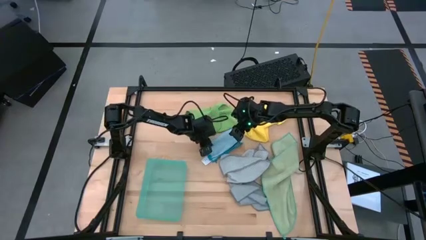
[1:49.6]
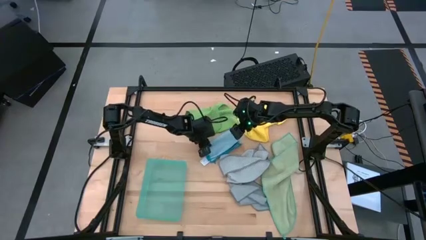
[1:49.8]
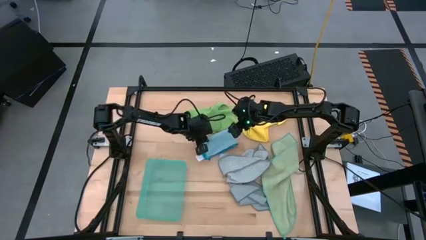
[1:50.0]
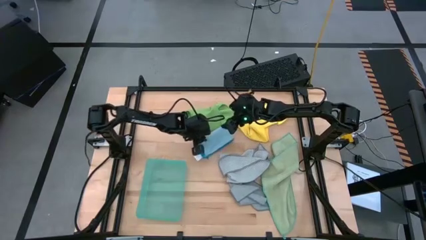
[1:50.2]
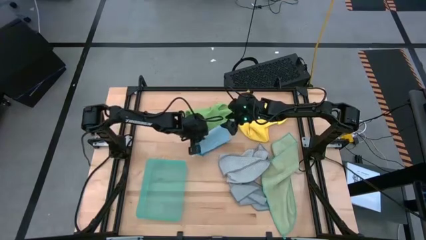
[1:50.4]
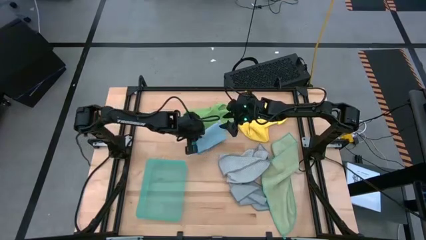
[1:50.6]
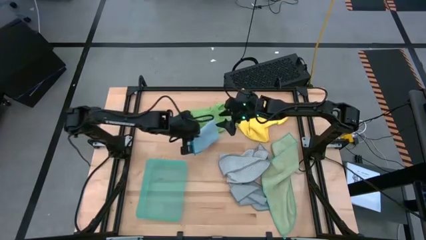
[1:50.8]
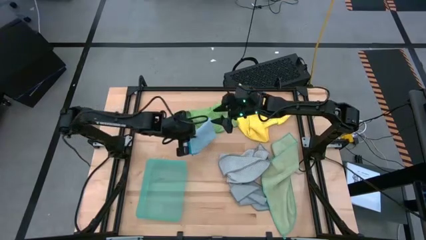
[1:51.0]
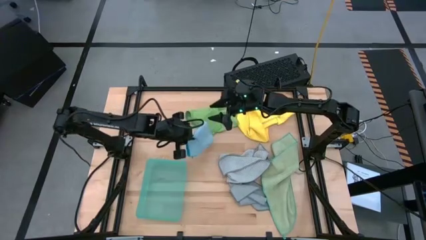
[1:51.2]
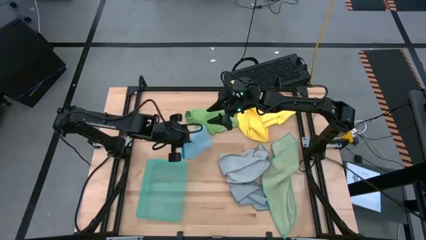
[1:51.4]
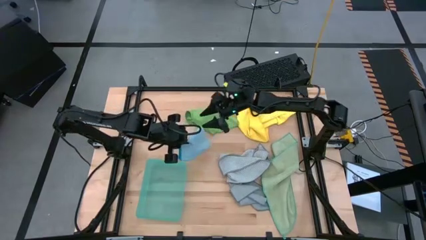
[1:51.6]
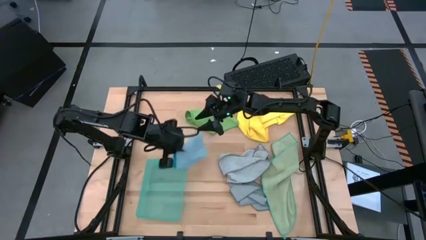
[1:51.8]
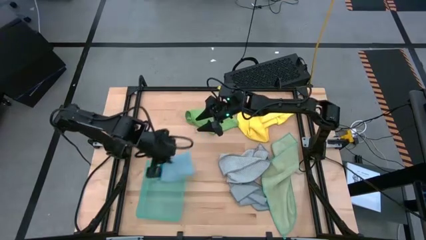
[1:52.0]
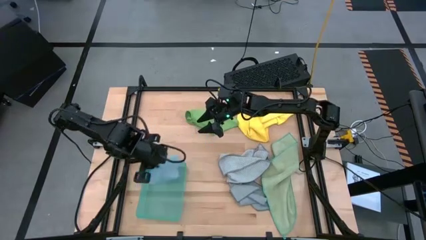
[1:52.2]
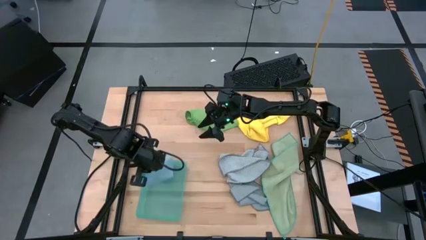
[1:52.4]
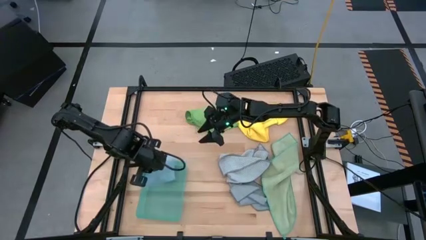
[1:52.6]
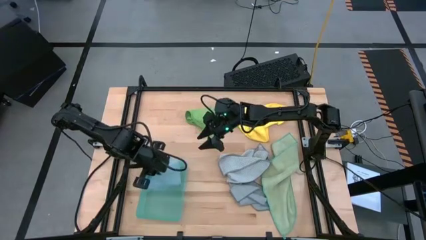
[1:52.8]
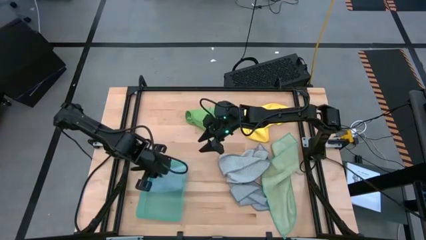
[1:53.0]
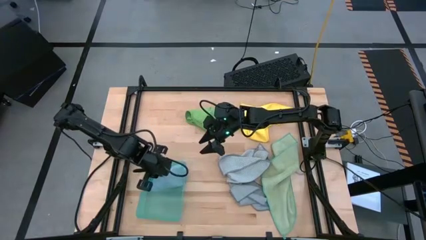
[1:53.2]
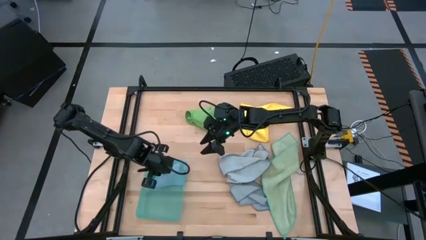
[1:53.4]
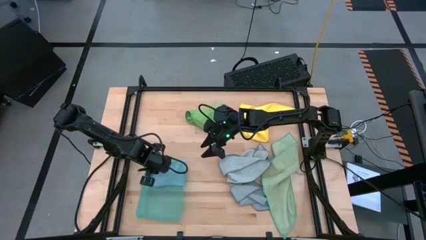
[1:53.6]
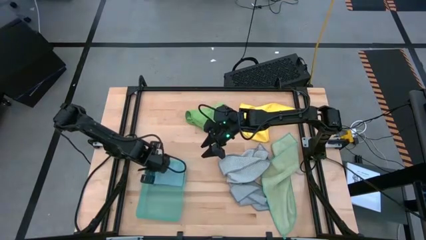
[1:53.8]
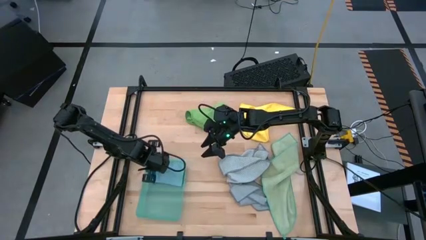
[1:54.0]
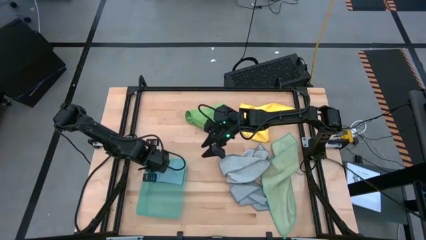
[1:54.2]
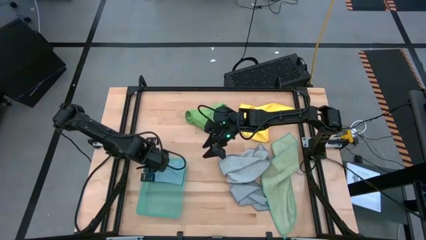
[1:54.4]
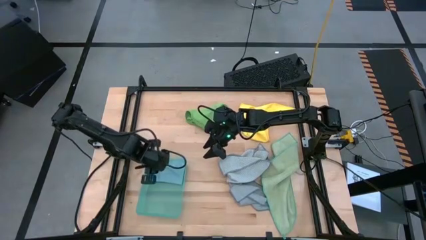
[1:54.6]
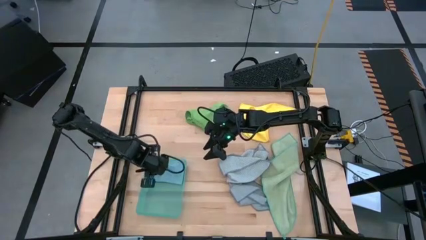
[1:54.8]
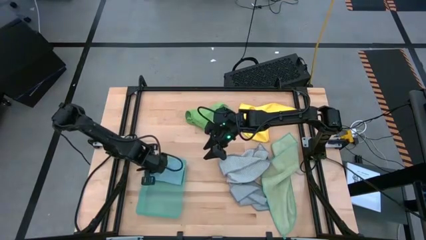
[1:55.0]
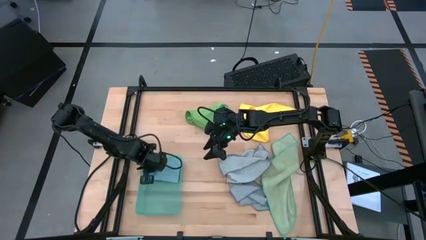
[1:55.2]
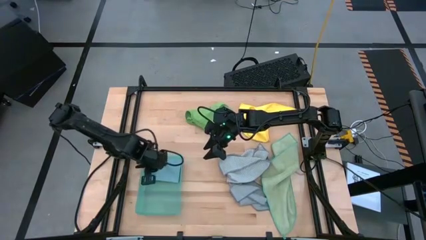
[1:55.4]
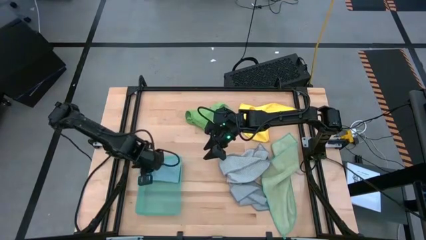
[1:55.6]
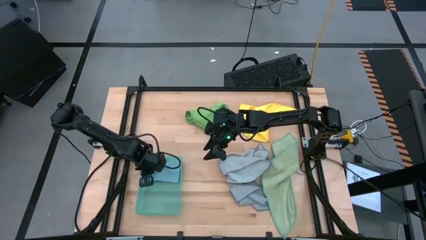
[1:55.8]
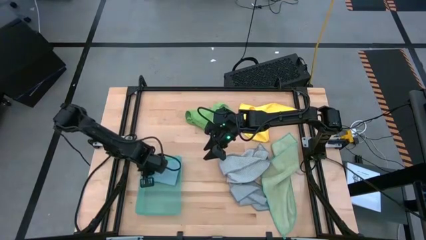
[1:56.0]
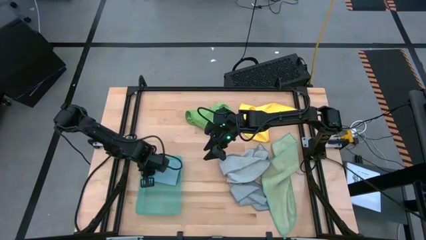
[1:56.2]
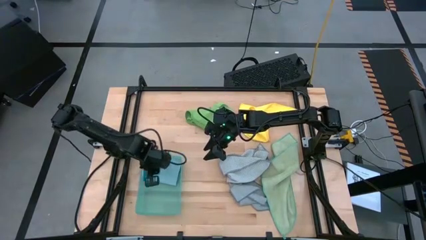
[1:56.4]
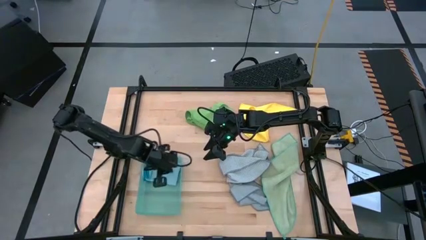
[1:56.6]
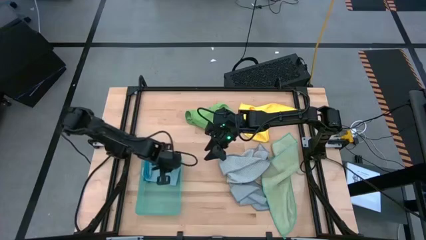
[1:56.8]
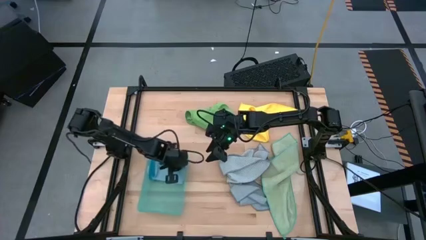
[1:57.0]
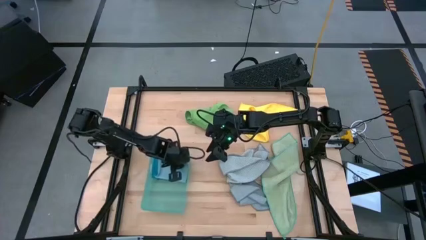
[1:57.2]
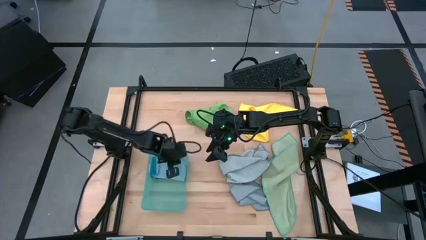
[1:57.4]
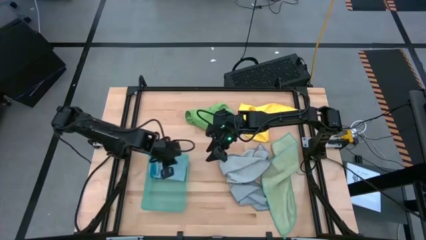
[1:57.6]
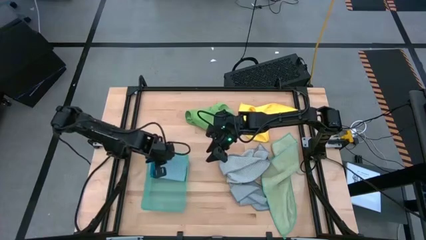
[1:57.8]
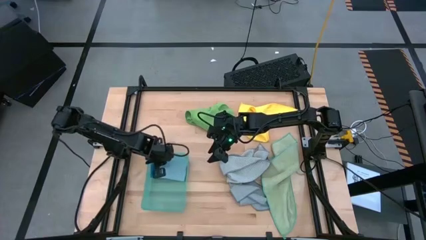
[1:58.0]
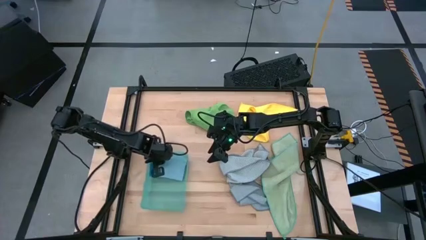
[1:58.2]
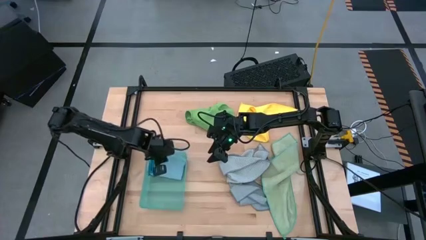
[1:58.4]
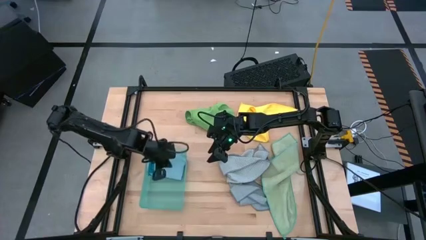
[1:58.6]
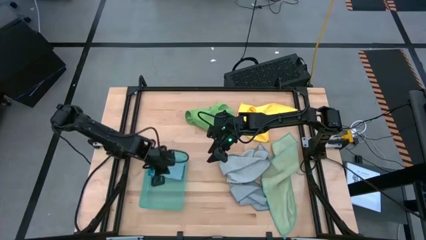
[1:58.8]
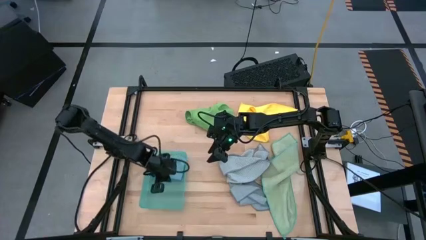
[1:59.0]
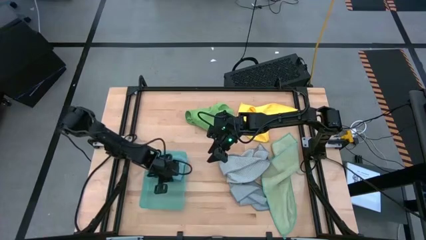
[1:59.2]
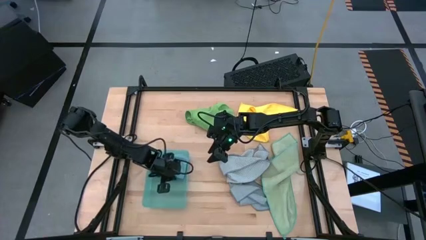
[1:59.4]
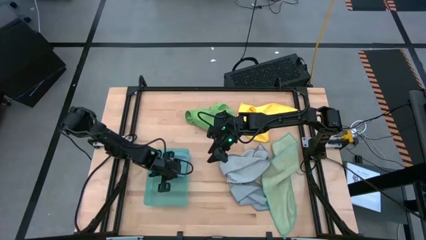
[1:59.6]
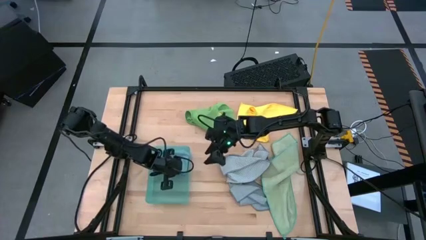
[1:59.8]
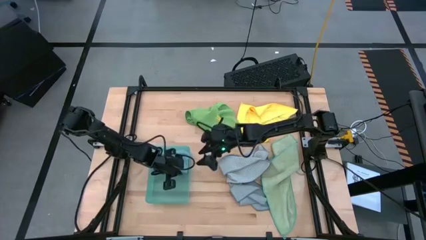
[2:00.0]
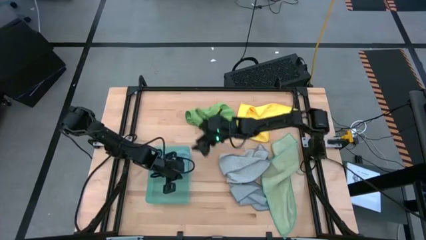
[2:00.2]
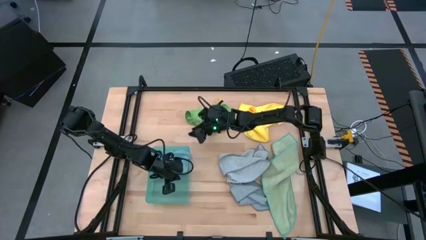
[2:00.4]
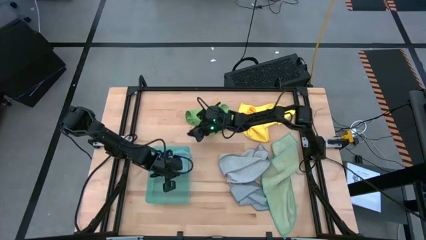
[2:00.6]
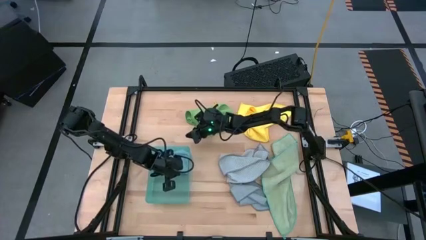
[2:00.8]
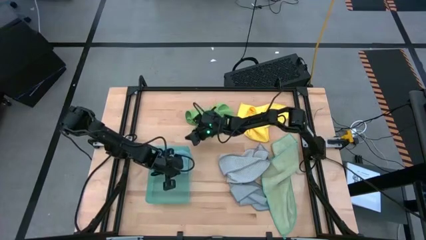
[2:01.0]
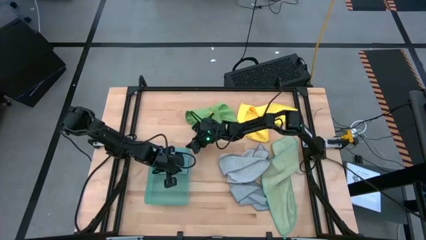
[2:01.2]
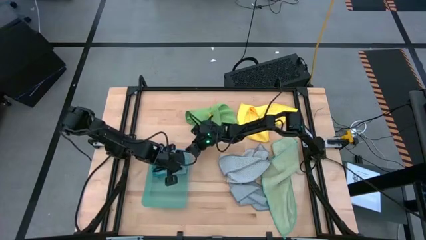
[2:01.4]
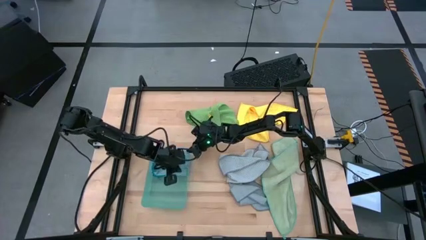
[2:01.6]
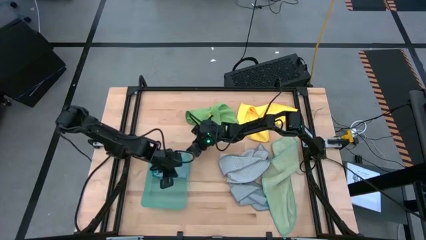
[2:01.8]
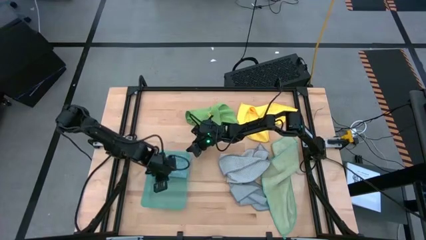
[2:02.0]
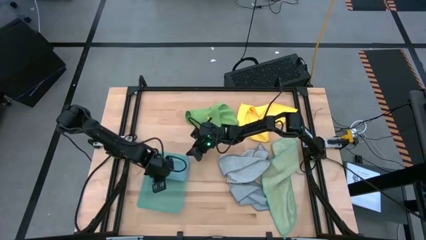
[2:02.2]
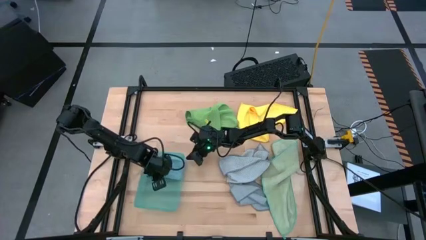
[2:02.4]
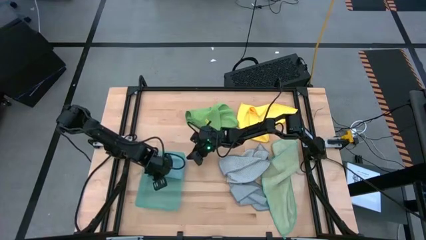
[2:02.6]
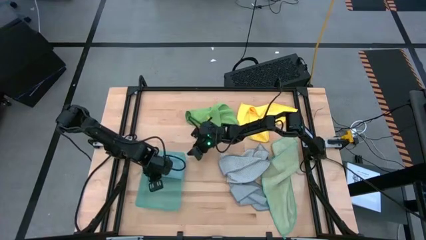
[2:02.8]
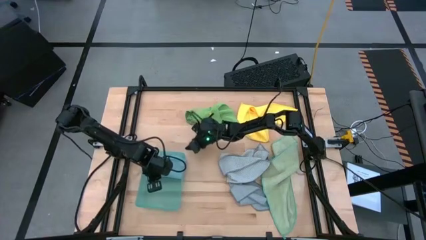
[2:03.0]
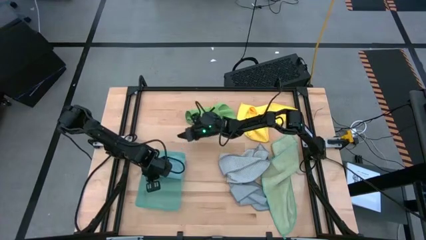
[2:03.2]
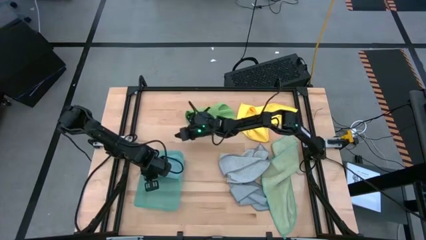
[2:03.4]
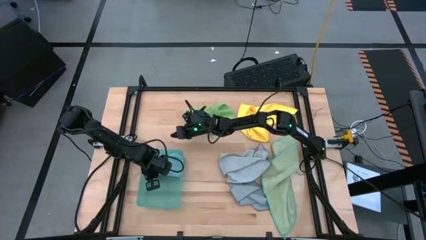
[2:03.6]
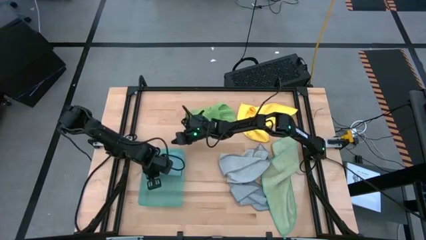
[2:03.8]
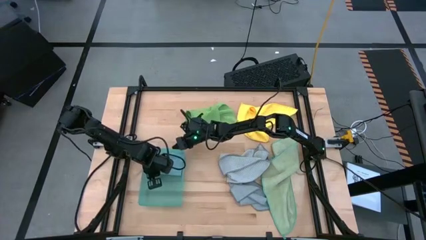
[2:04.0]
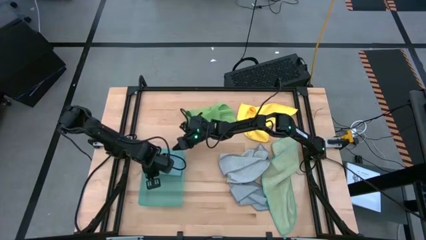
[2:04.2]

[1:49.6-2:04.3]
Task: Fold microfiber towels
Put the blue microfiber cloth into the green bin

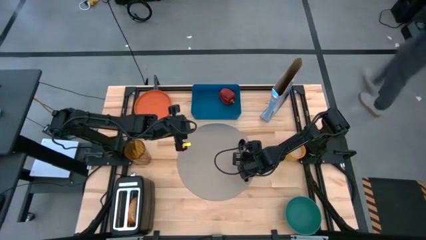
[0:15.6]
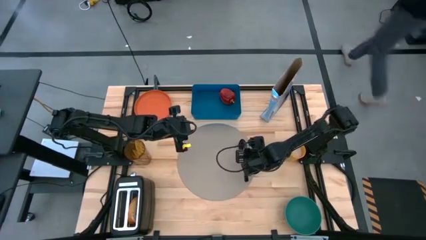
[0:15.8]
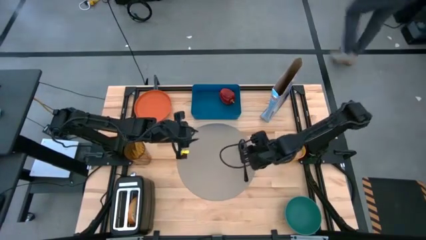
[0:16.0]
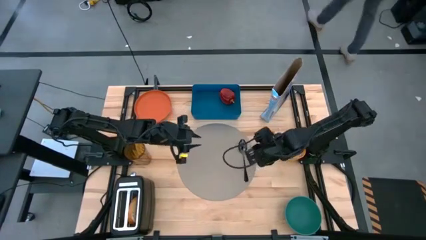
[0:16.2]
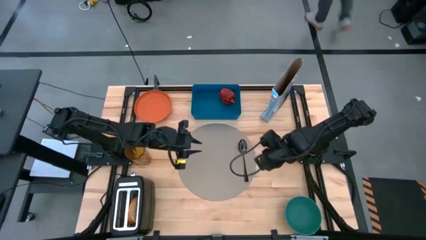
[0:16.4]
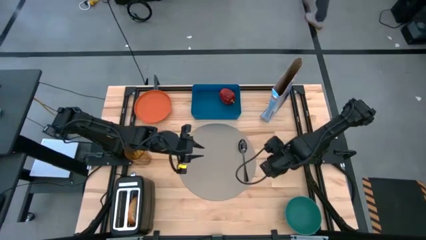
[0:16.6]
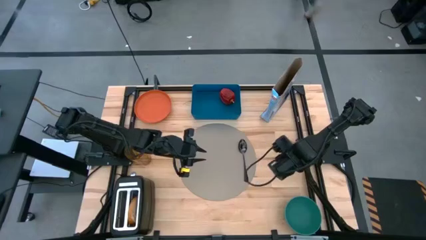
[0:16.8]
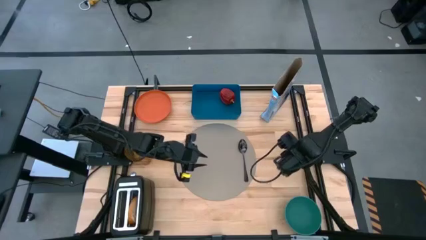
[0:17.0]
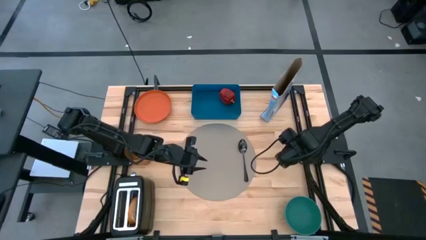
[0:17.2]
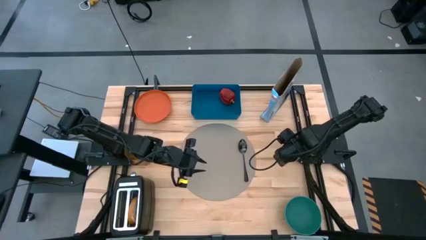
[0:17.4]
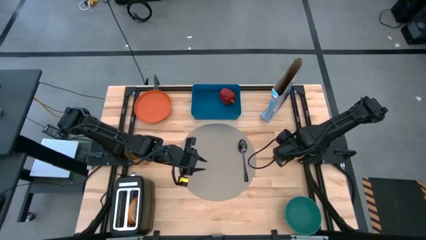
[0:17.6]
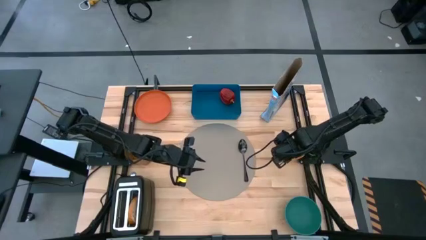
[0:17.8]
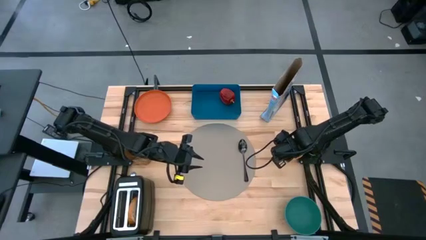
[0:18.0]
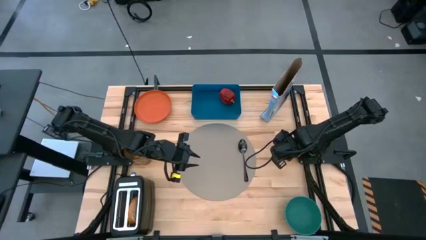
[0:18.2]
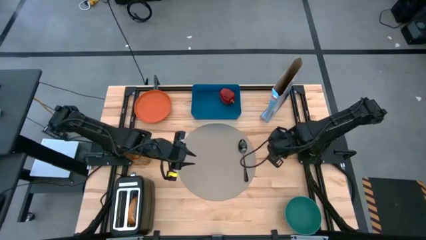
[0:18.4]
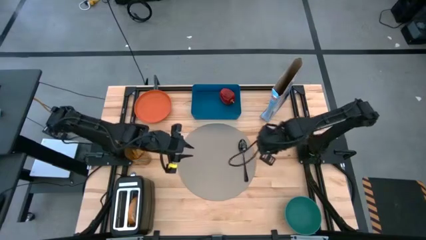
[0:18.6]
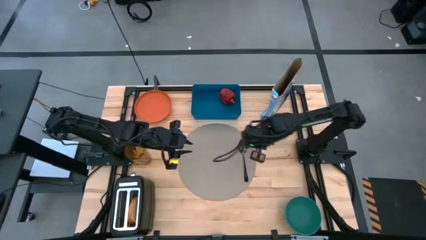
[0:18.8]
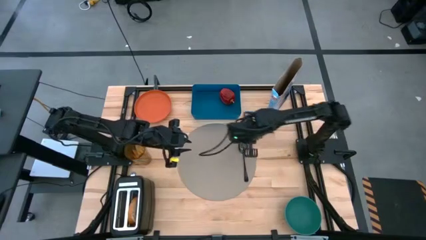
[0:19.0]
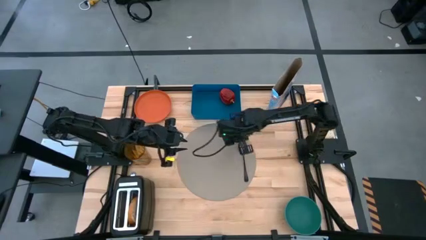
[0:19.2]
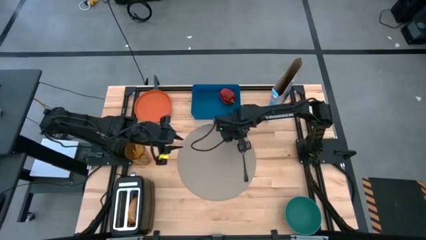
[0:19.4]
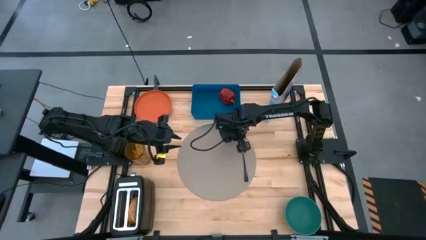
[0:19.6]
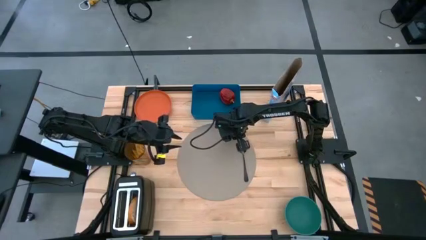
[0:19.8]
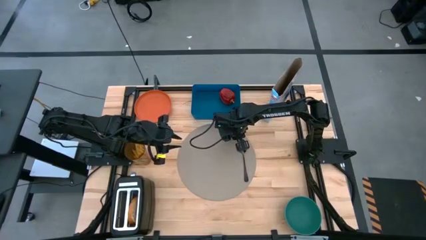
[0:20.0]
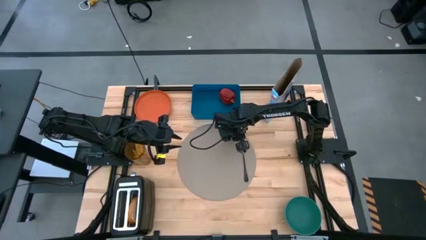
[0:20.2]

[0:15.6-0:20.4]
Task: Arrange a breakfast setting
Put the yellow cup of milk on the top right of the gray table mat
